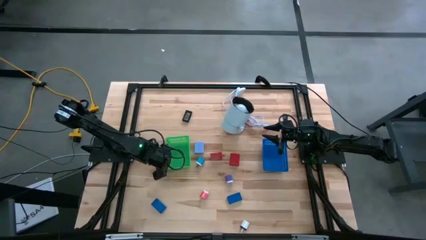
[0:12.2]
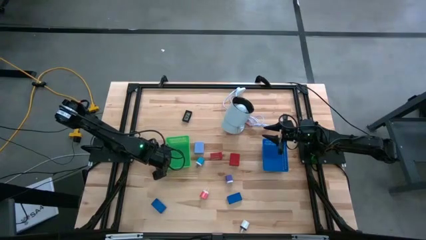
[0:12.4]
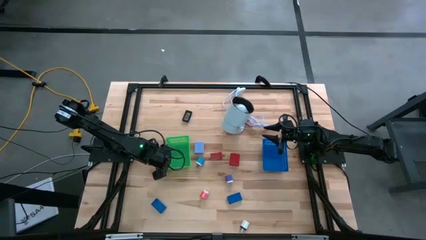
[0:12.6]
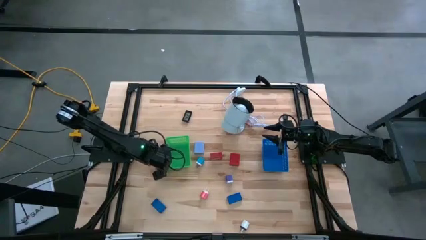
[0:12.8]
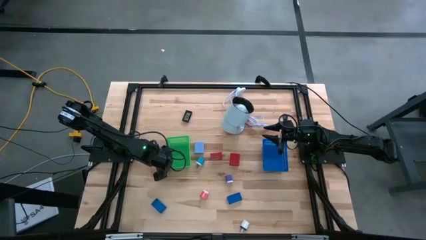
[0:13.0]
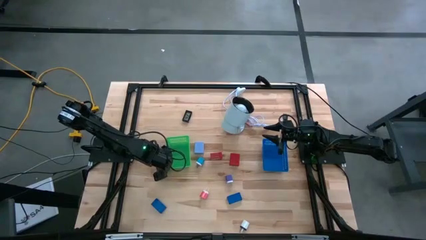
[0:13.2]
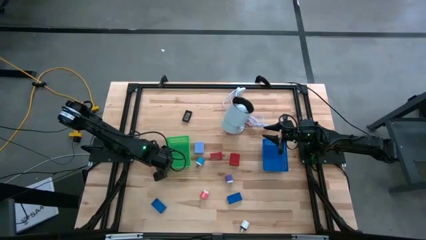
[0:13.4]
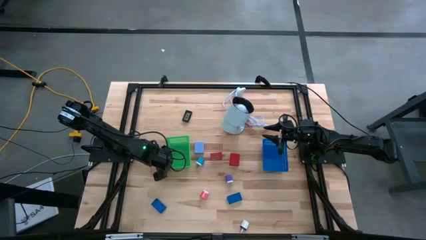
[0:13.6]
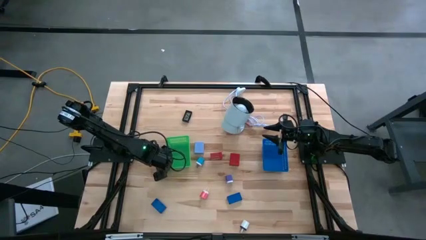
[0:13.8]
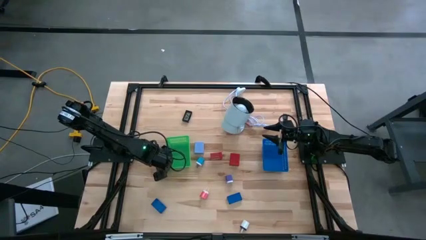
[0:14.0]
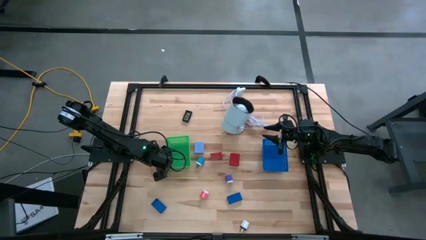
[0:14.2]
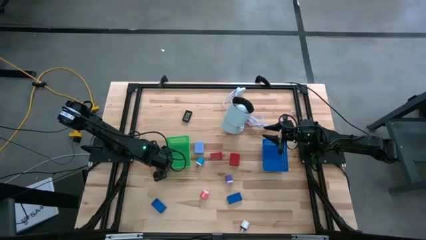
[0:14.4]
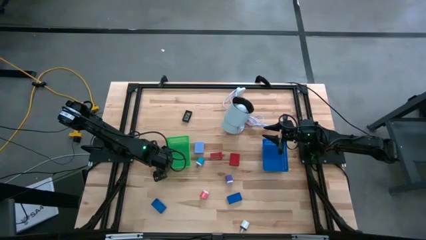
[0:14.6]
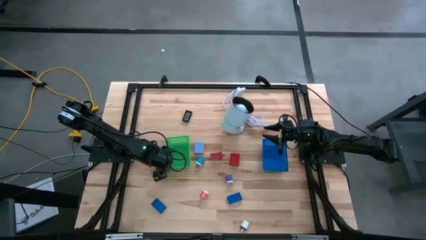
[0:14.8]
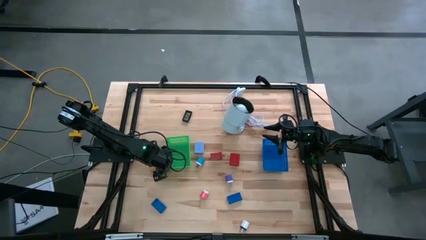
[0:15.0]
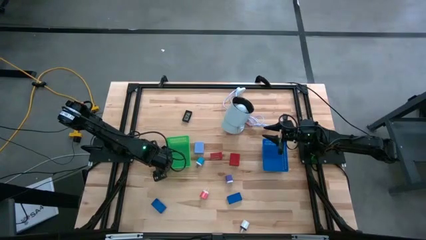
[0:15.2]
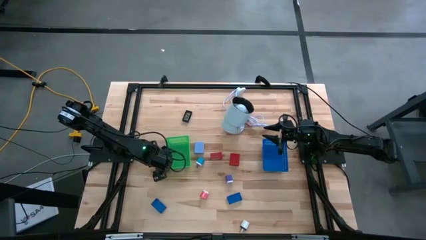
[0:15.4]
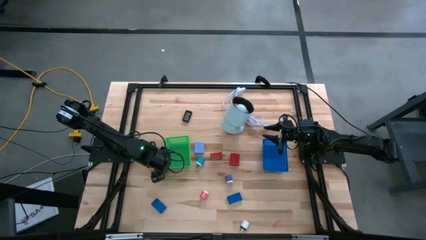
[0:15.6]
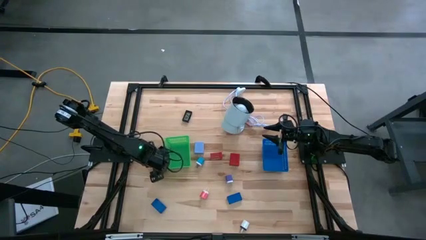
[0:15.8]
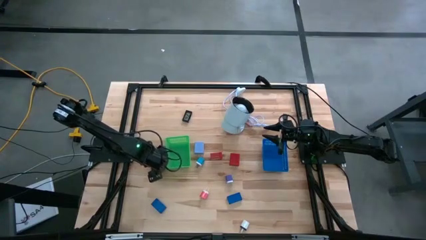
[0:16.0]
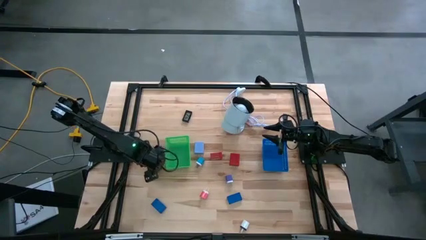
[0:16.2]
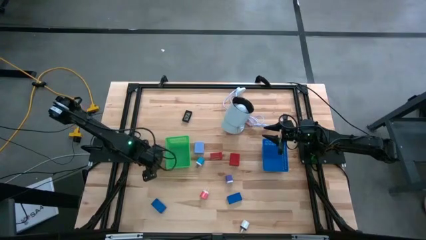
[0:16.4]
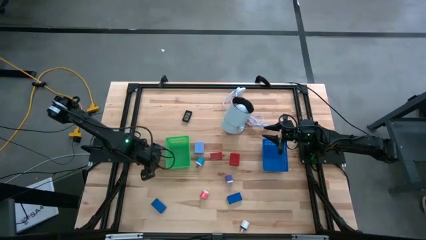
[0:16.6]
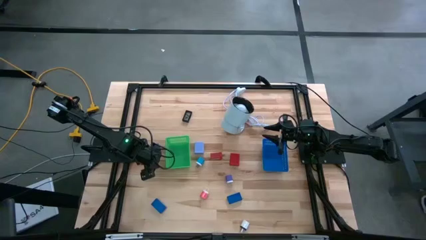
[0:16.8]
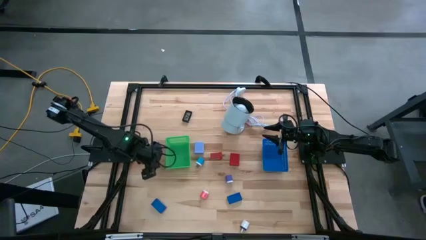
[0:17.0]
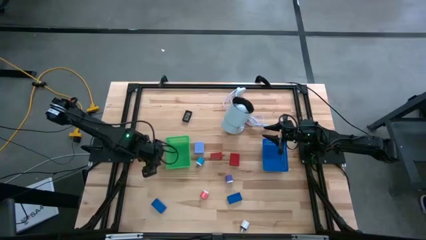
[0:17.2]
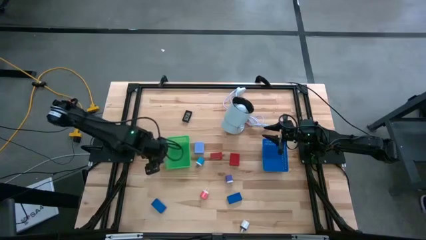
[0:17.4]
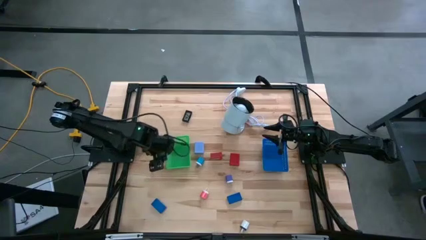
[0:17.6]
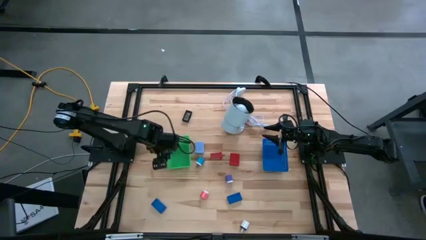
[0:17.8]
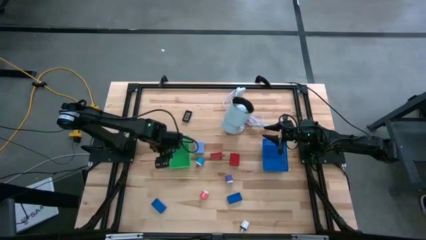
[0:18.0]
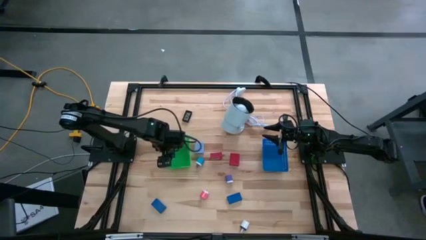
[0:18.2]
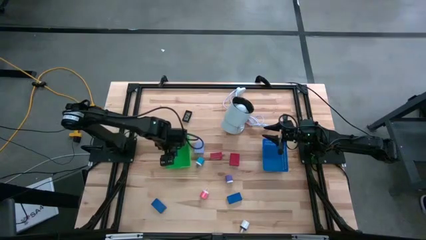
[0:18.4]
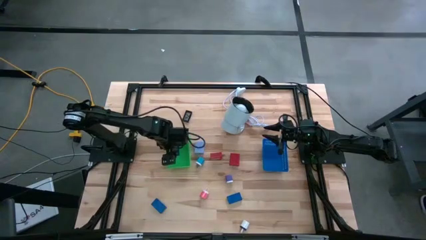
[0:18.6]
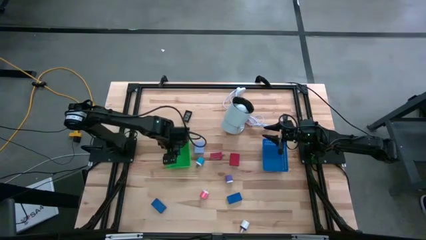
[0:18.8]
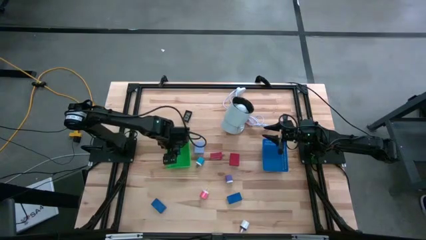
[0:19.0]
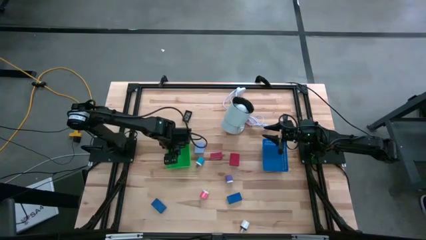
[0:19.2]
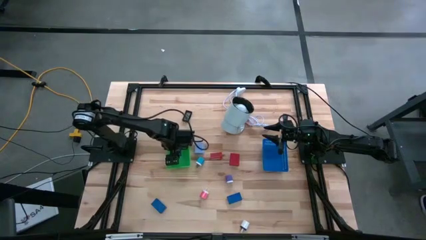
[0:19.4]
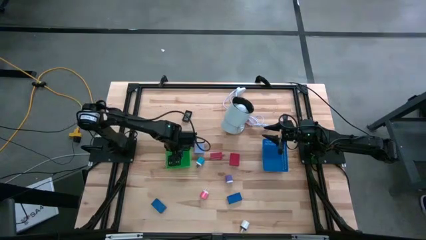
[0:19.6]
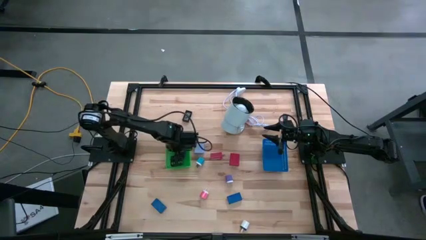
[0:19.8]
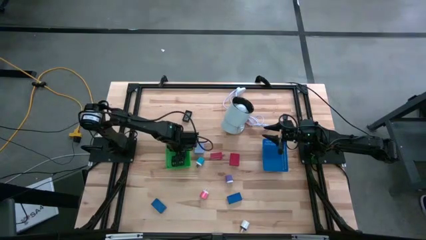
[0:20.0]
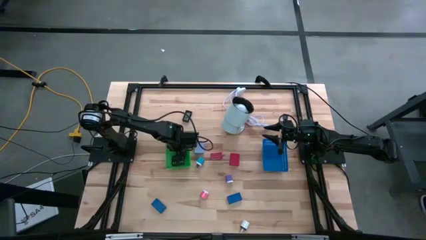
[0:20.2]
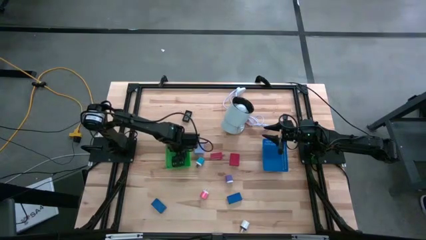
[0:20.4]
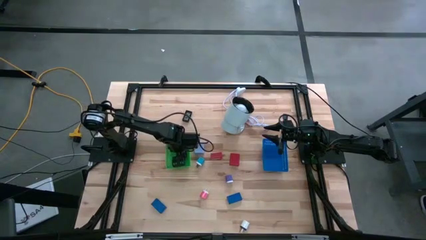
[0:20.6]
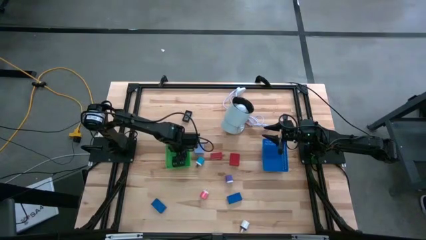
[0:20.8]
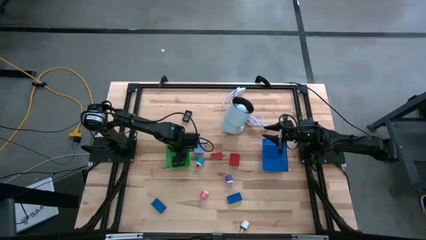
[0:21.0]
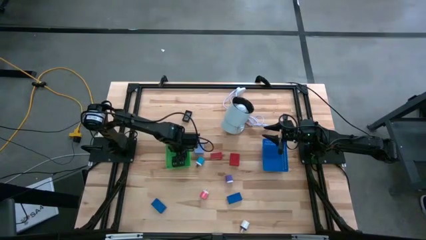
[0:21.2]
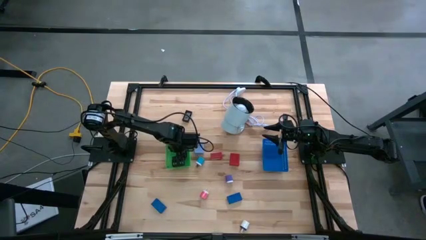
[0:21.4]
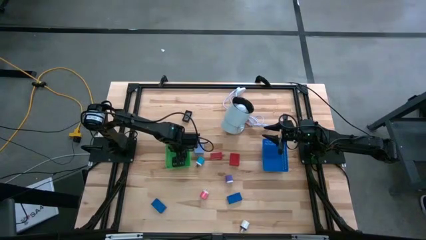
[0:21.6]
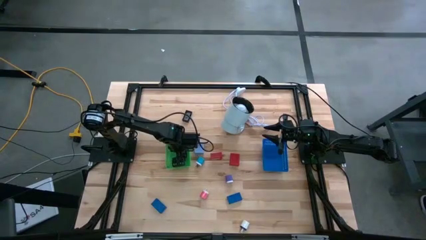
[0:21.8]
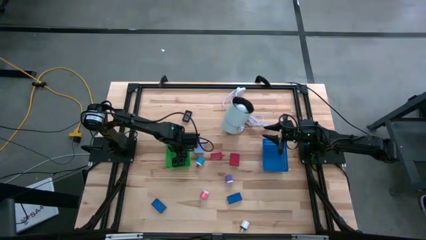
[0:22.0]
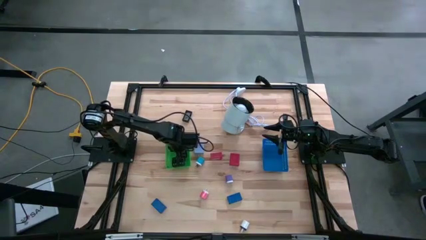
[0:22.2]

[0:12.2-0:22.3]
Task: Pick & Place Office items
Put the top left blue digital timer into the green bin
